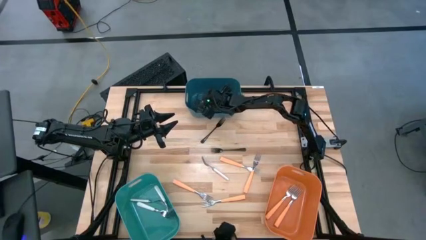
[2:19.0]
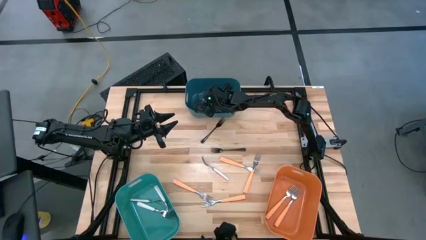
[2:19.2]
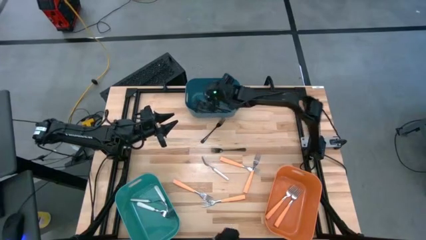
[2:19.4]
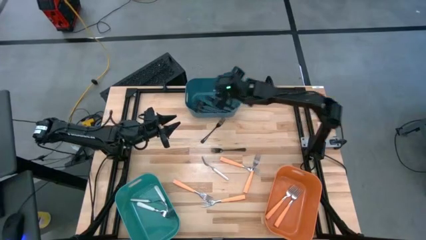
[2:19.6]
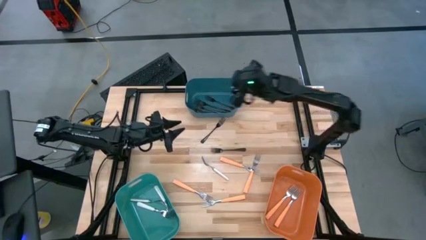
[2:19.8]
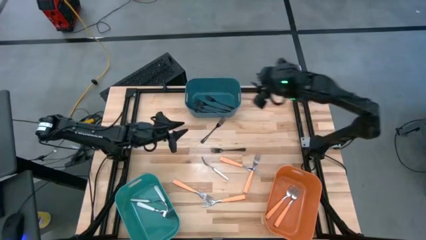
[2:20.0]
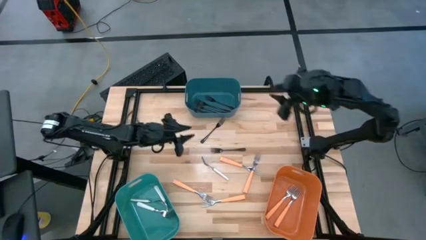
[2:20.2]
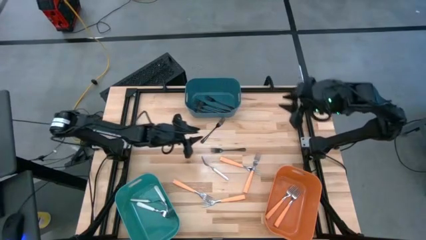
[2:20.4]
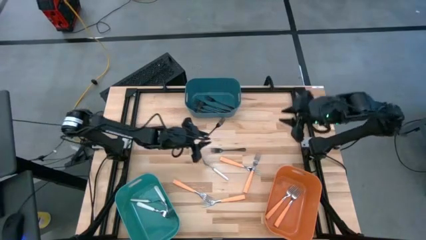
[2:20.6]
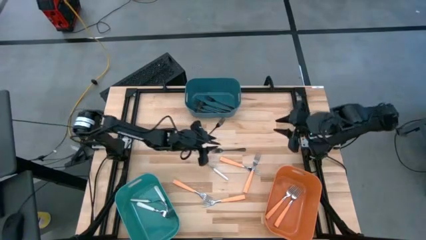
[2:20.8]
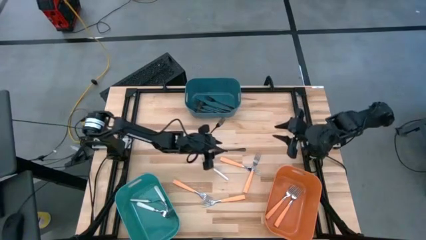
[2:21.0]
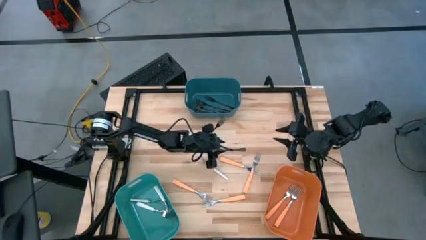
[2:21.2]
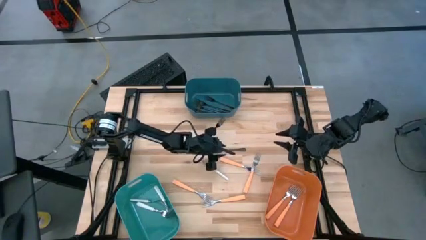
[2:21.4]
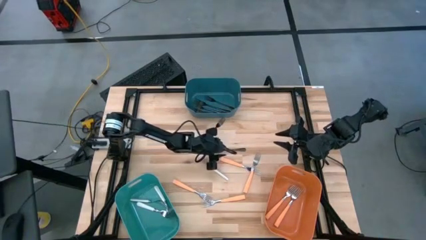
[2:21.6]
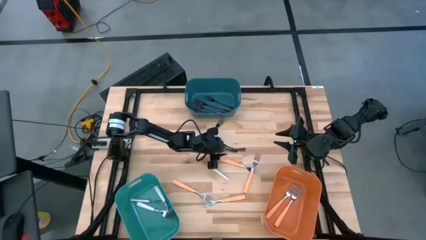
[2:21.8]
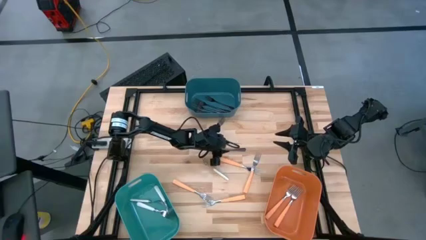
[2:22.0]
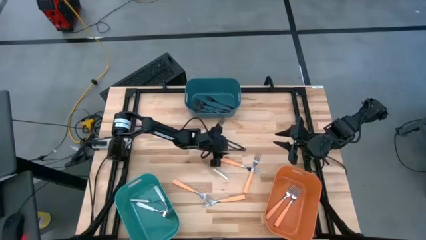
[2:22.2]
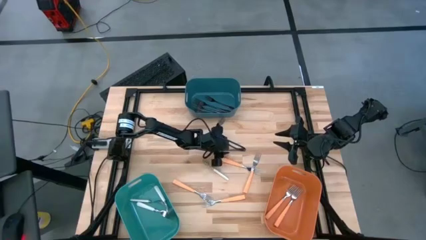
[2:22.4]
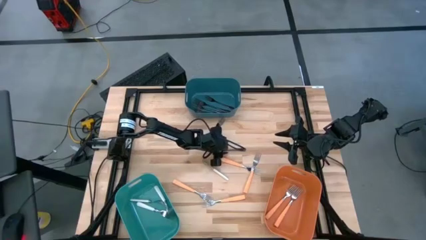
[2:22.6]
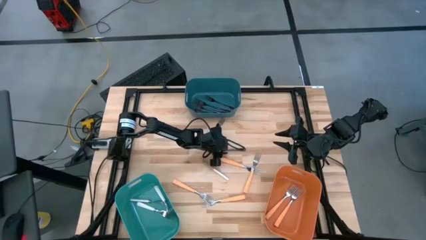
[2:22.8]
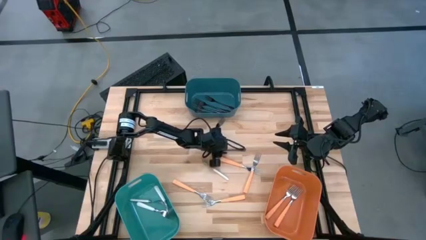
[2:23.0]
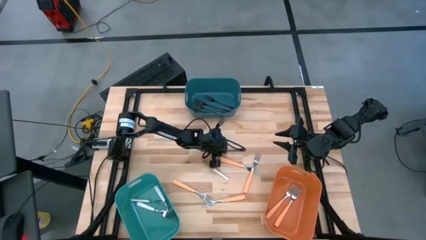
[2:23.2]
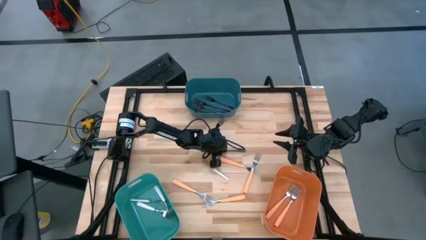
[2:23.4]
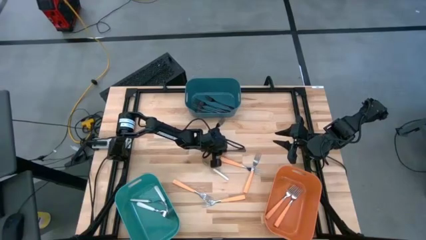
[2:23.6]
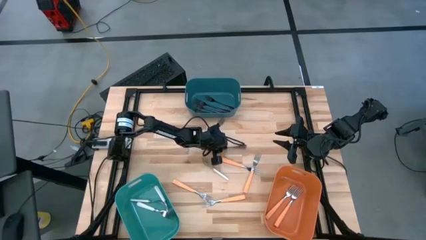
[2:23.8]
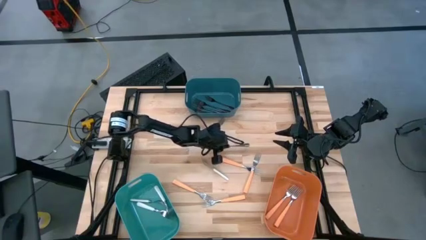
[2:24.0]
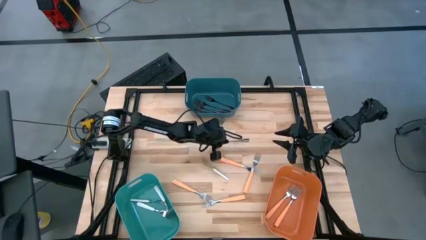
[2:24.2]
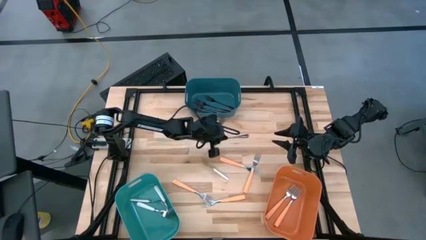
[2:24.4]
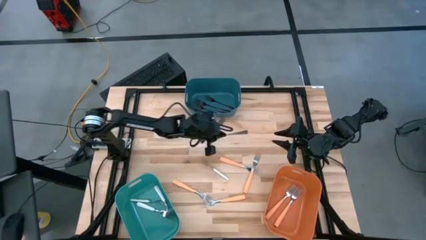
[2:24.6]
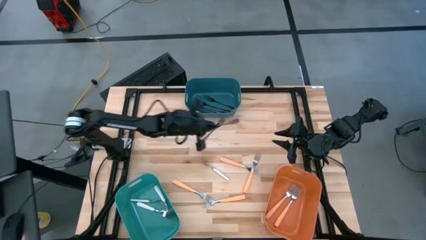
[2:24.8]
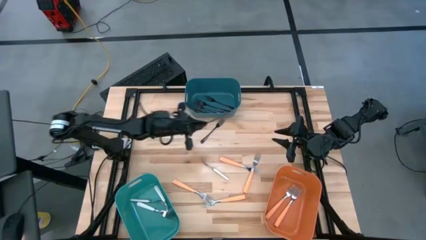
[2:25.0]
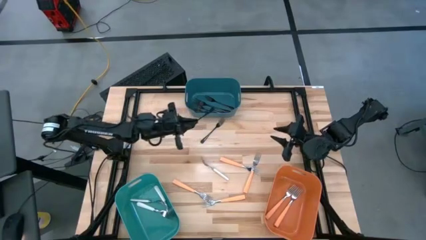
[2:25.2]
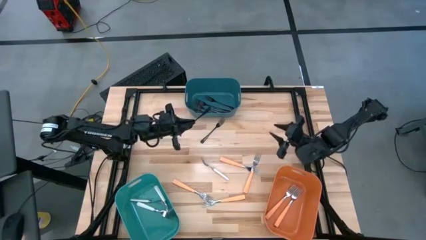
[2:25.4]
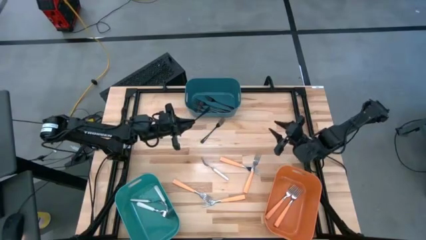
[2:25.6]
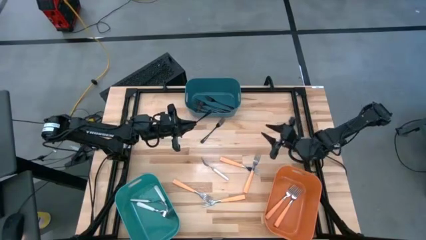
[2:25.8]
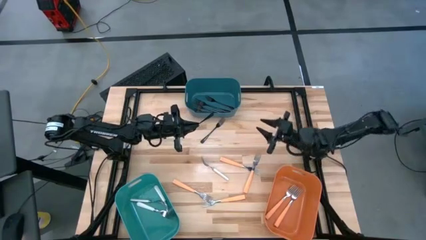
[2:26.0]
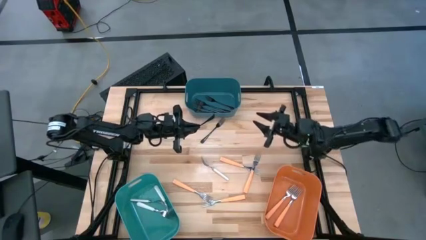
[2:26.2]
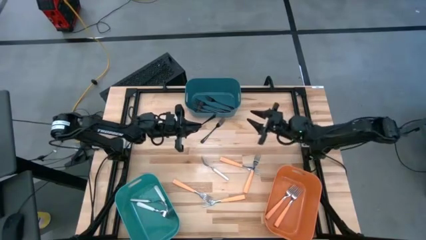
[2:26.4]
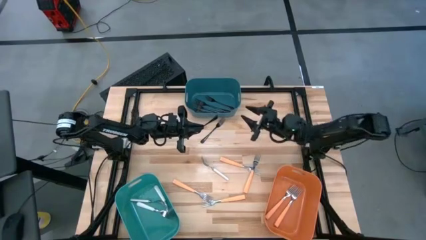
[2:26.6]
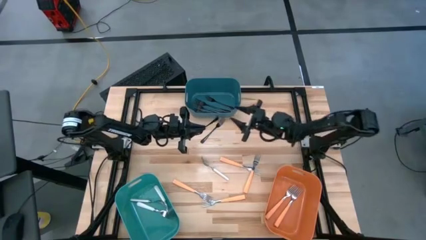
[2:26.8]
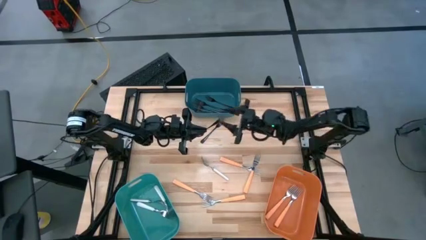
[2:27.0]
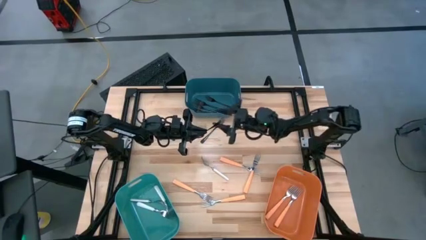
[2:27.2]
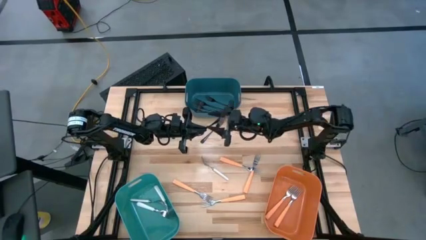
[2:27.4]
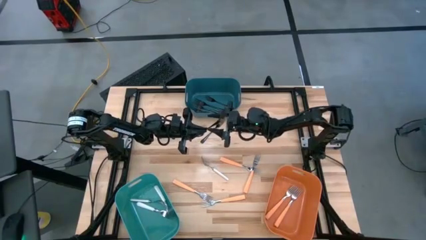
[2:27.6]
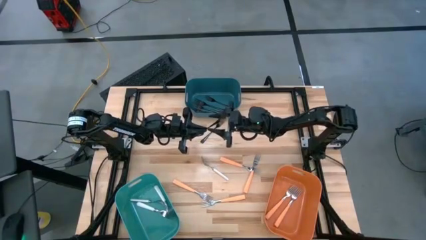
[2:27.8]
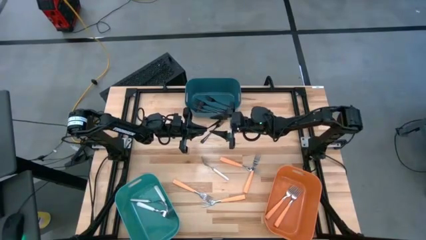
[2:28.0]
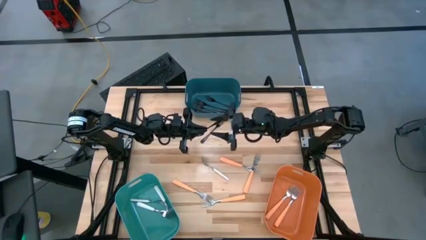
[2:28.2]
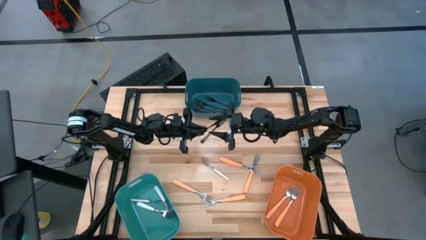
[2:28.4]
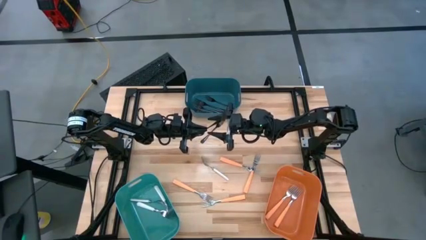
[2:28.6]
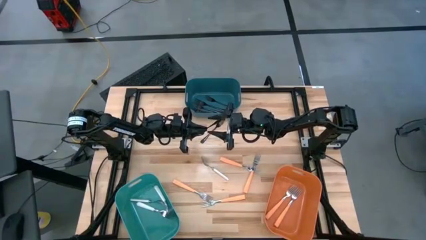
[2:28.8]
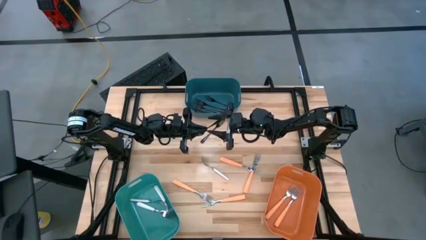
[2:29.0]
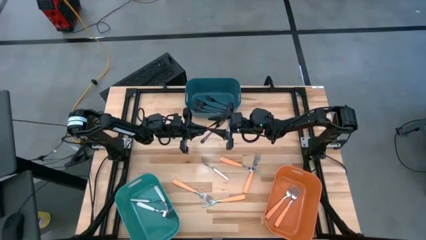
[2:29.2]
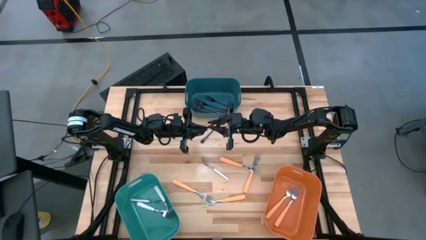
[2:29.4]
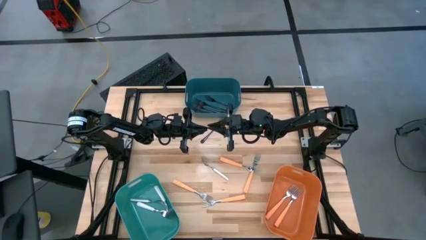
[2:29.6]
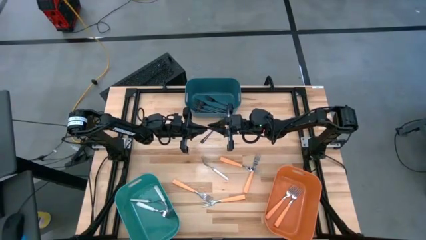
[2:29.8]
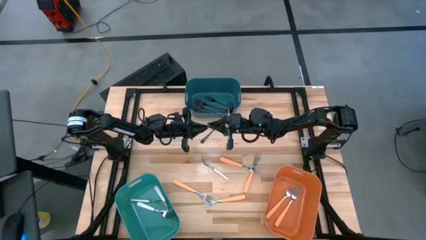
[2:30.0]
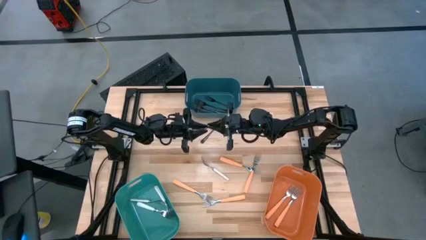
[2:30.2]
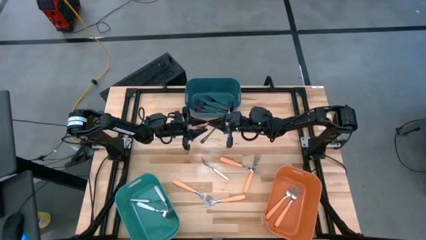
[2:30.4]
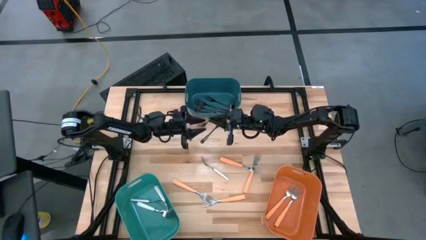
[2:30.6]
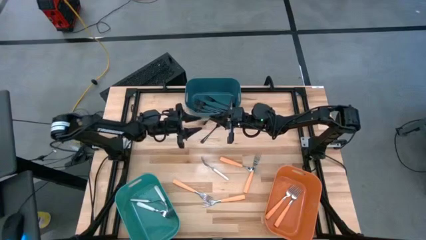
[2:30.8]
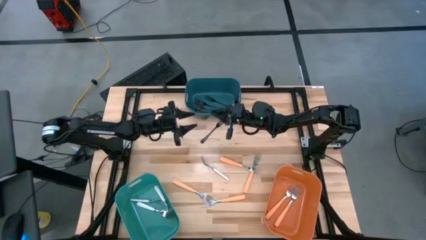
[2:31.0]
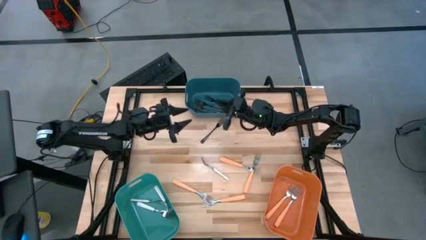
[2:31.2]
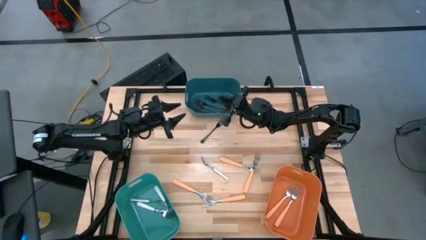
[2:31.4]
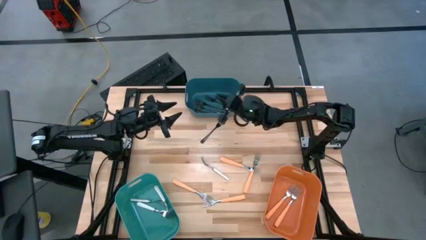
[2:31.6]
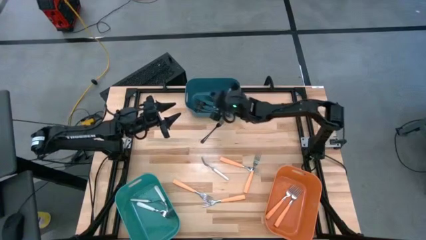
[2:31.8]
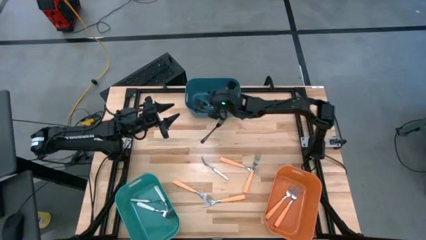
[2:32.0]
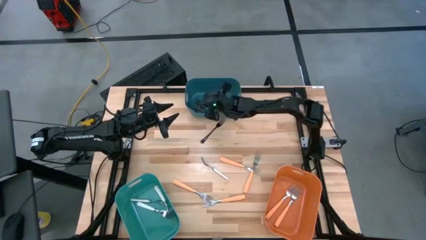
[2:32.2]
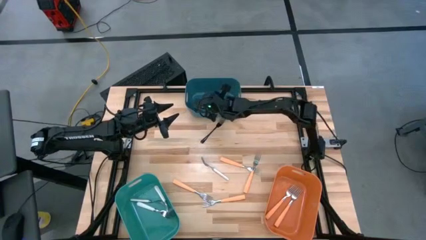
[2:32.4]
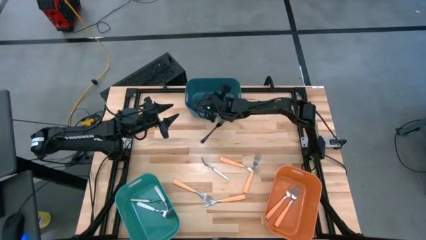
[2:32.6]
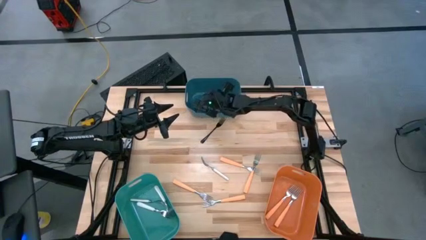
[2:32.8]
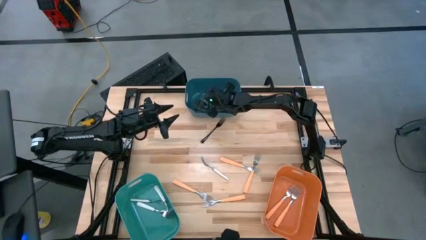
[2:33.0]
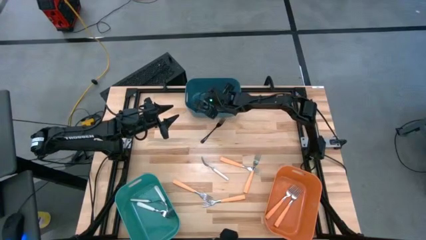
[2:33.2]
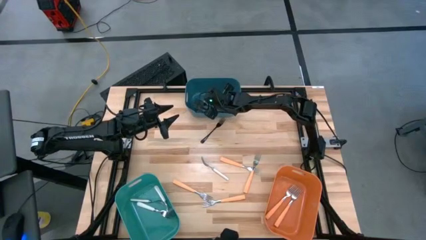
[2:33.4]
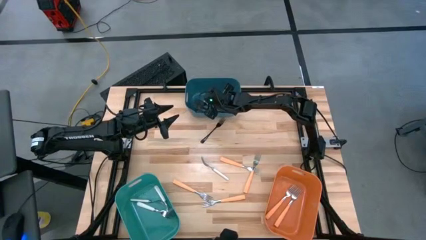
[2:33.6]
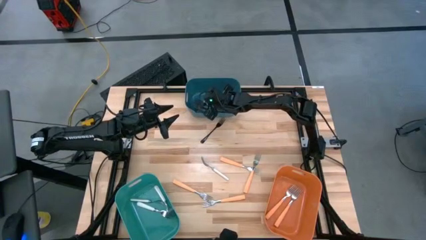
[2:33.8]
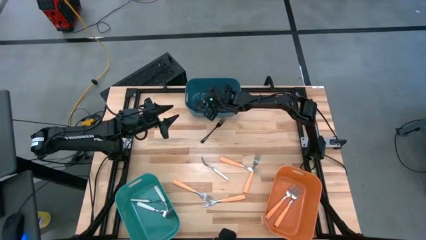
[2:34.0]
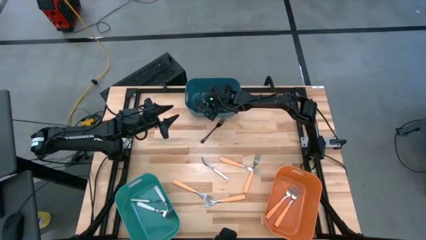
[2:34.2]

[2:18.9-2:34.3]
Task: Sort silverware by color (type)
Put the black fork into the blue bin
